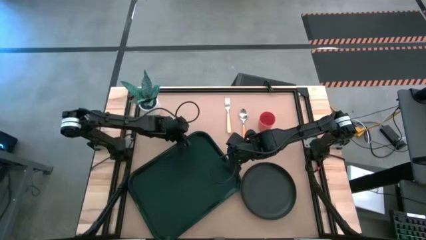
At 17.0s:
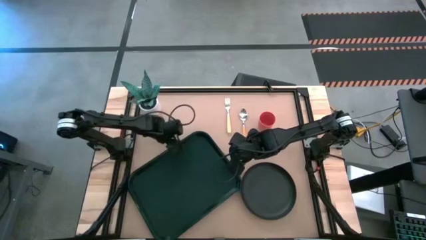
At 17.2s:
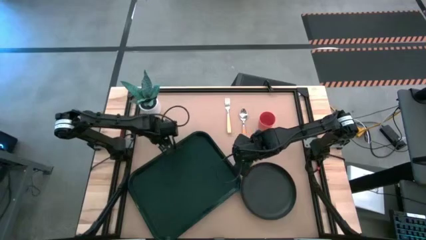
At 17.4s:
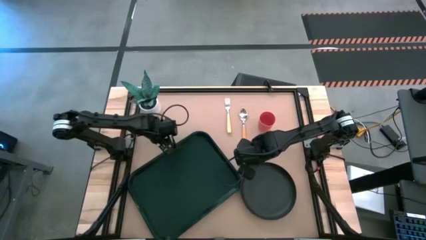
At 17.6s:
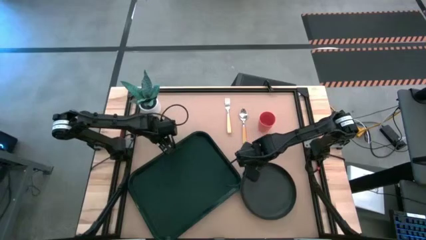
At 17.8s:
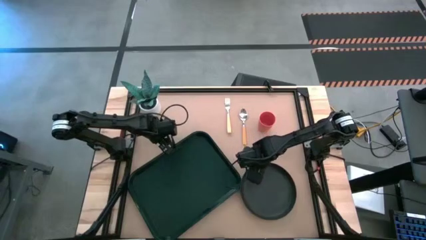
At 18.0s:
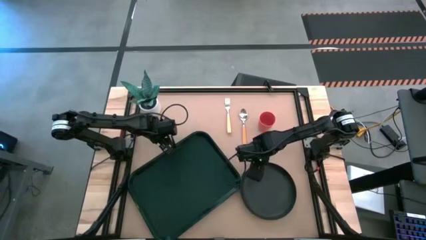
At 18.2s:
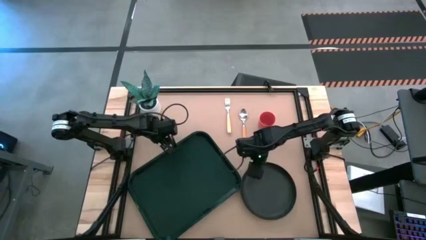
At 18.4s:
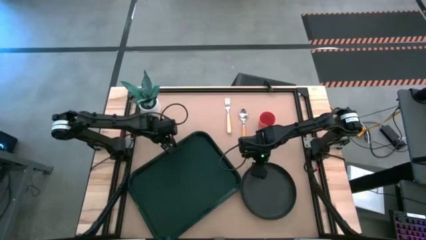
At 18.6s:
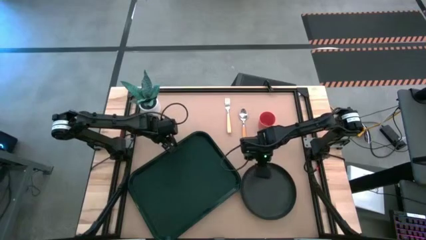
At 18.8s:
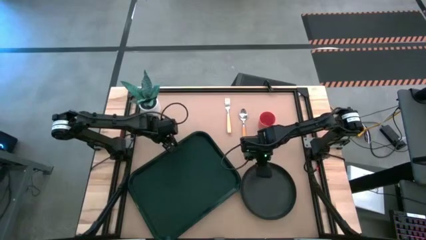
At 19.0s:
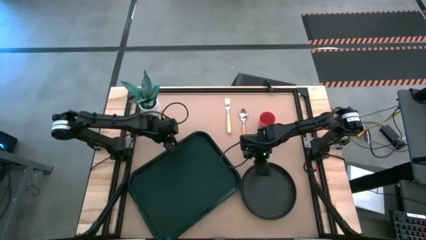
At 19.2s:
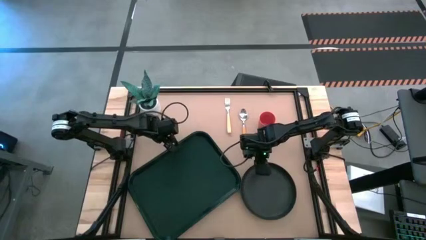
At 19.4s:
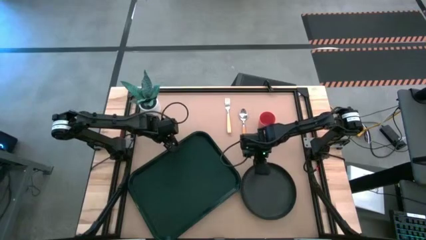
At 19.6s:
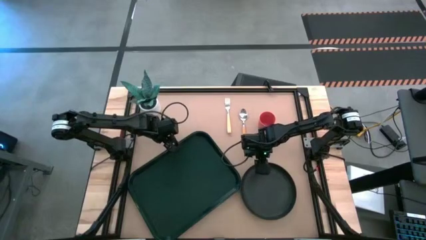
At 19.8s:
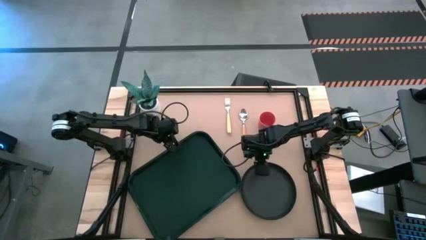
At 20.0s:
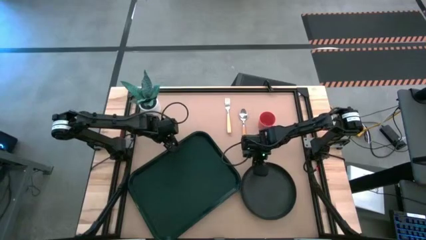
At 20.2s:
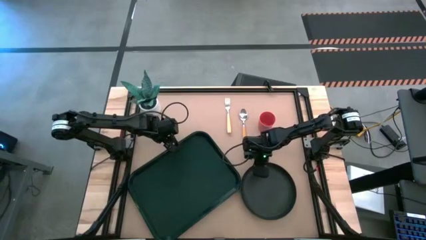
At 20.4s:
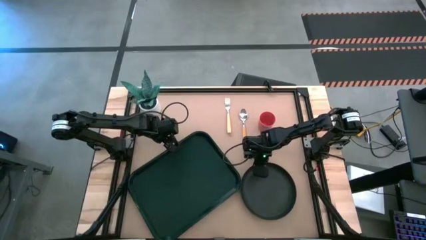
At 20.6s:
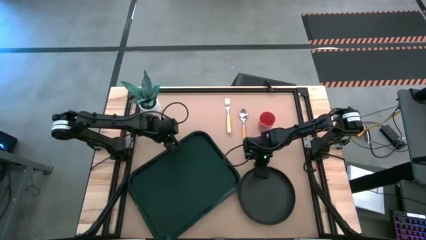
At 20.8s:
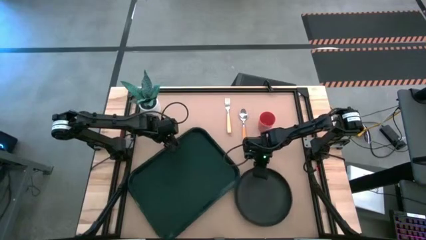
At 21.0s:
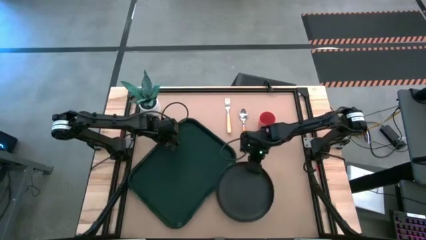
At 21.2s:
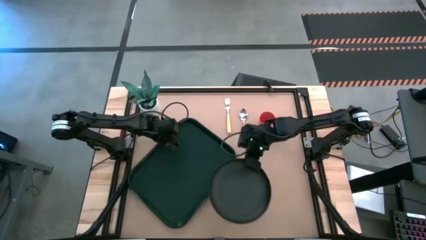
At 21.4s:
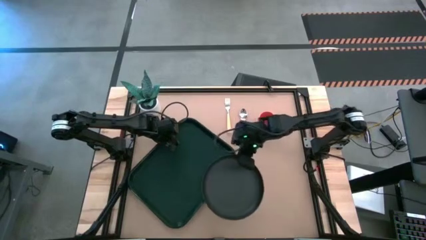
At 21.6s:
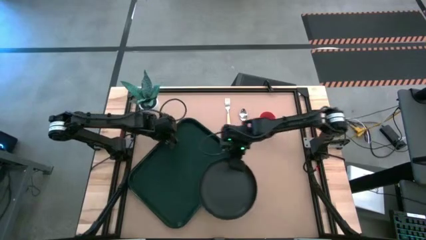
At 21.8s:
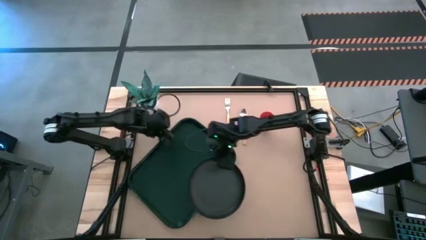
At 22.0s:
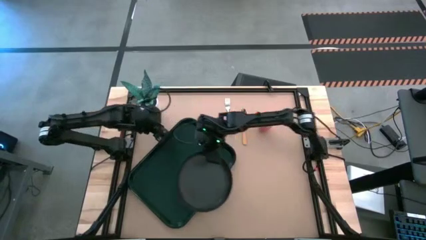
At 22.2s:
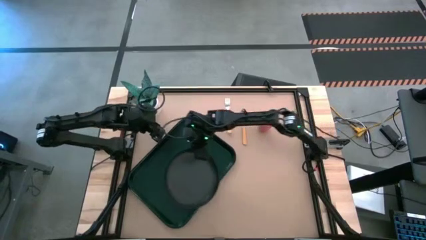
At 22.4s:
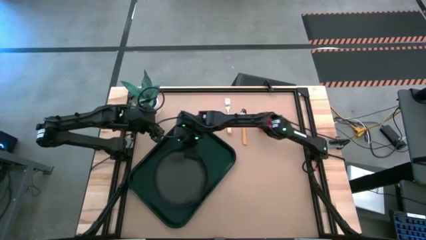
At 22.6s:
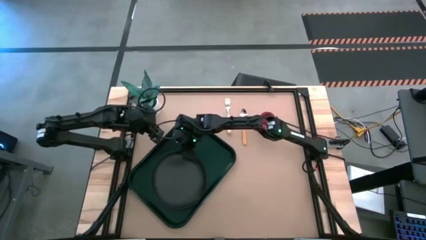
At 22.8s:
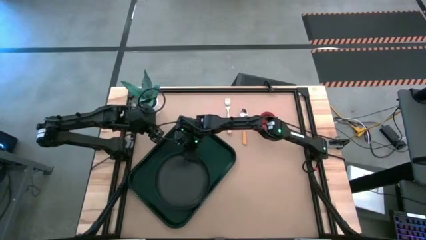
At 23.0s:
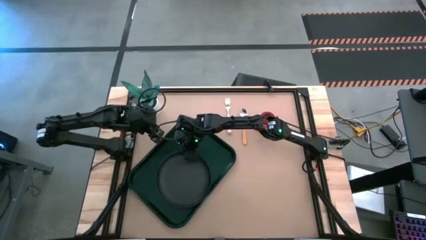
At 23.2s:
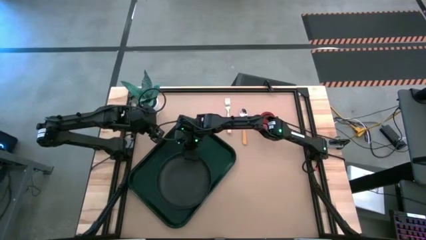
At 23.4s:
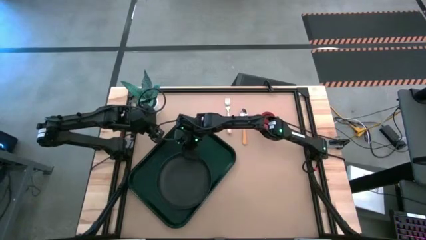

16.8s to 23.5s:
Task: Pick and place plate/cup/fork/spoon on tray
Put the black plate on the center of the black serving tray

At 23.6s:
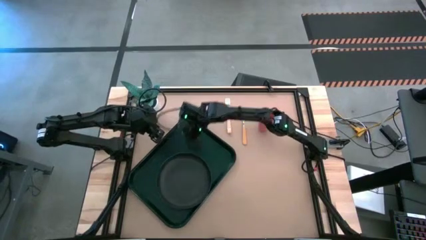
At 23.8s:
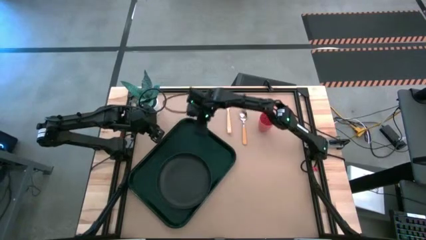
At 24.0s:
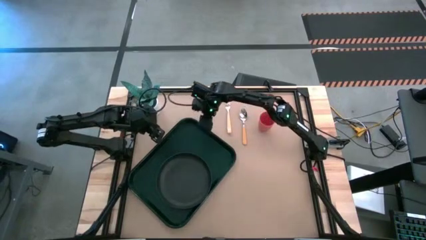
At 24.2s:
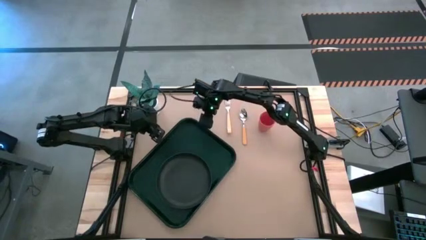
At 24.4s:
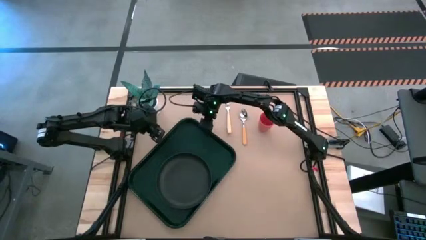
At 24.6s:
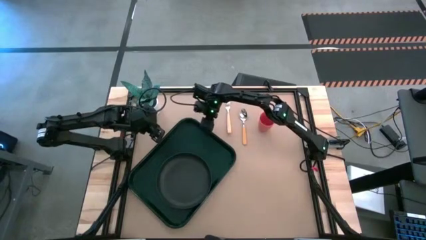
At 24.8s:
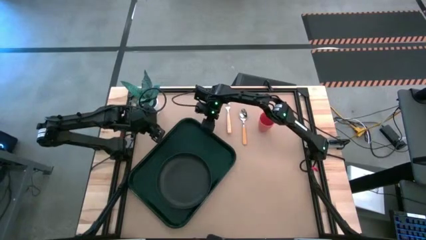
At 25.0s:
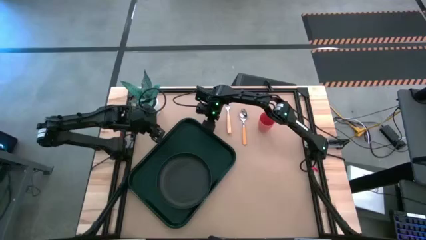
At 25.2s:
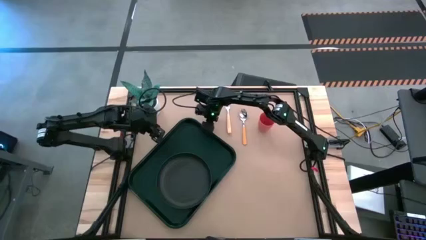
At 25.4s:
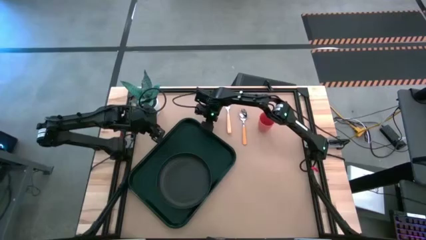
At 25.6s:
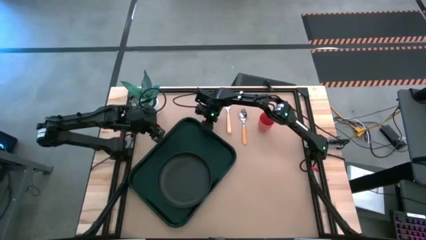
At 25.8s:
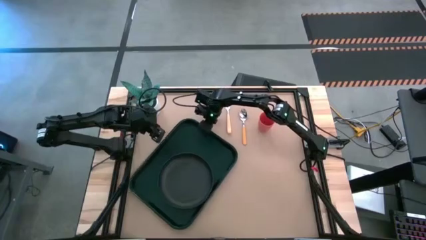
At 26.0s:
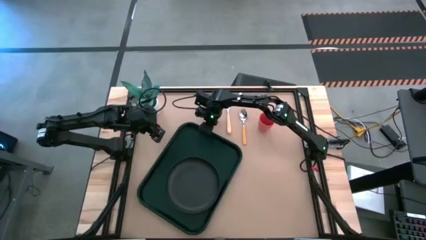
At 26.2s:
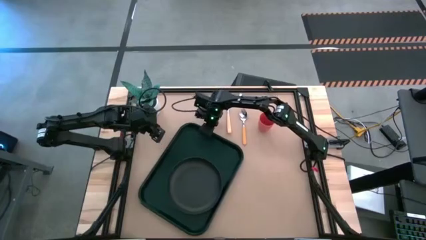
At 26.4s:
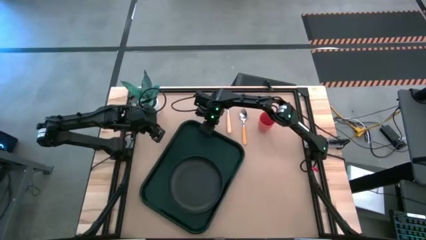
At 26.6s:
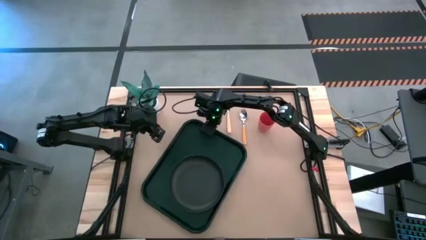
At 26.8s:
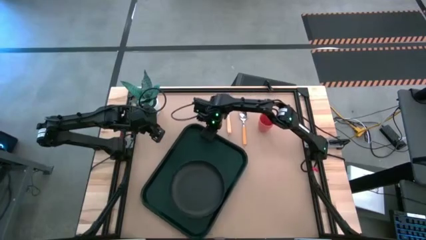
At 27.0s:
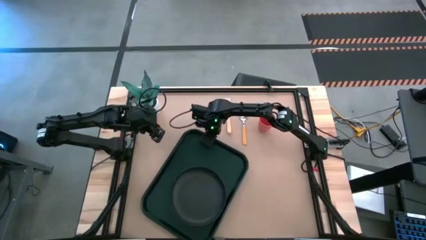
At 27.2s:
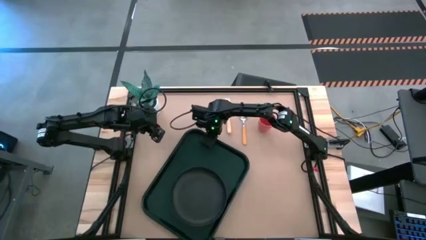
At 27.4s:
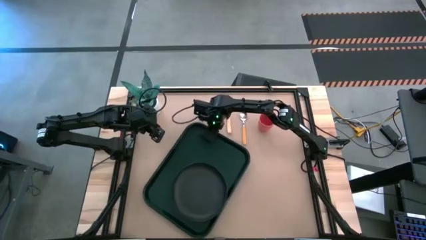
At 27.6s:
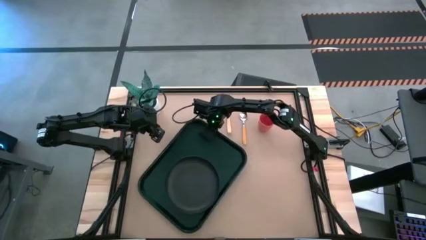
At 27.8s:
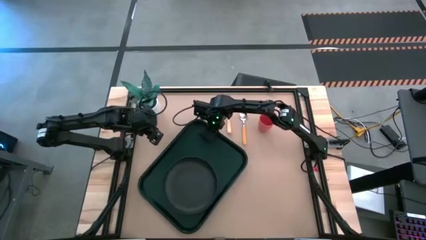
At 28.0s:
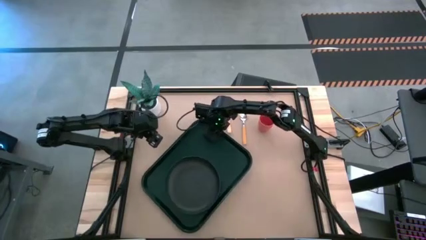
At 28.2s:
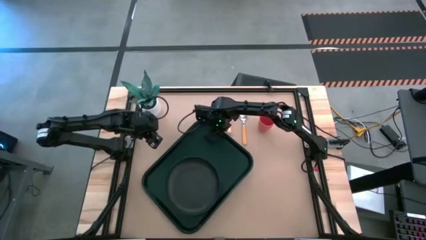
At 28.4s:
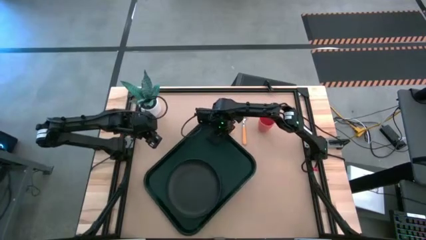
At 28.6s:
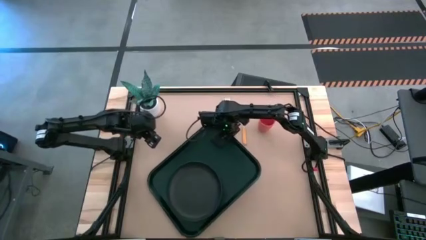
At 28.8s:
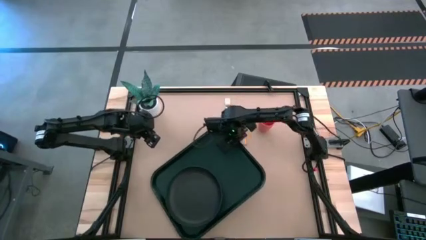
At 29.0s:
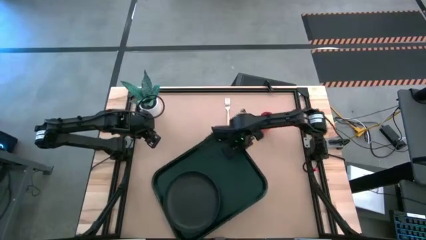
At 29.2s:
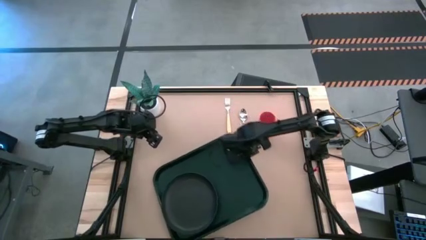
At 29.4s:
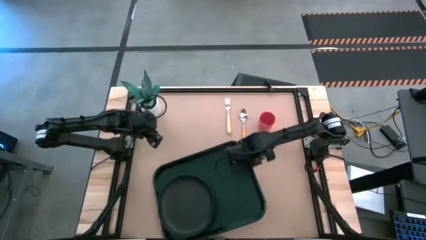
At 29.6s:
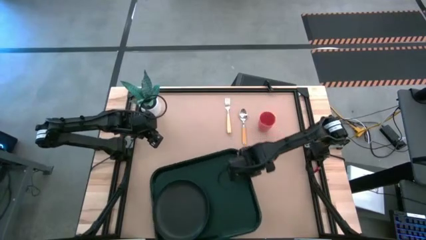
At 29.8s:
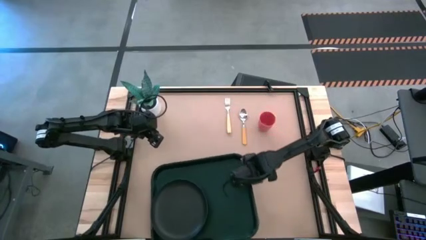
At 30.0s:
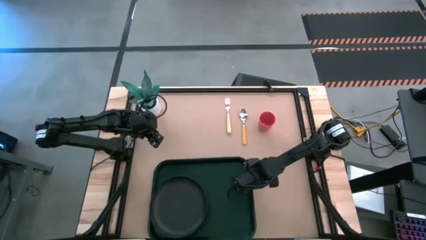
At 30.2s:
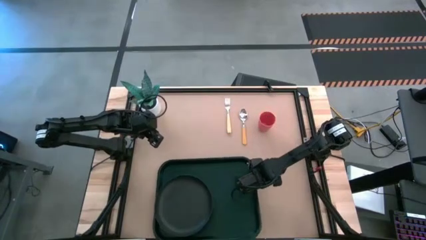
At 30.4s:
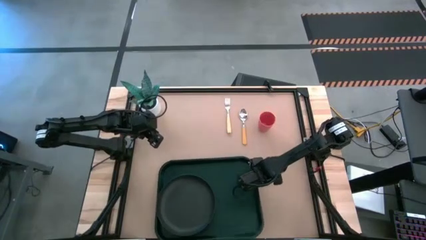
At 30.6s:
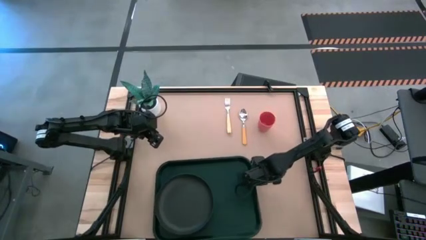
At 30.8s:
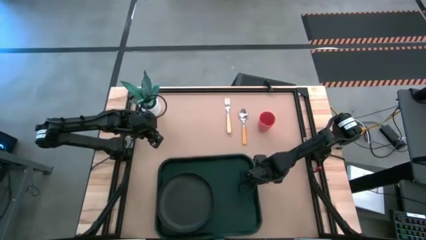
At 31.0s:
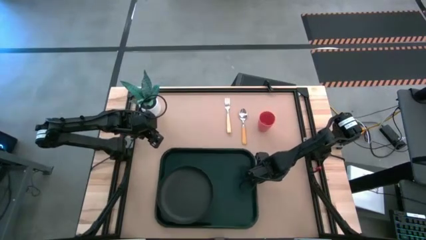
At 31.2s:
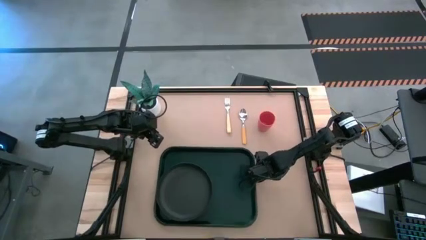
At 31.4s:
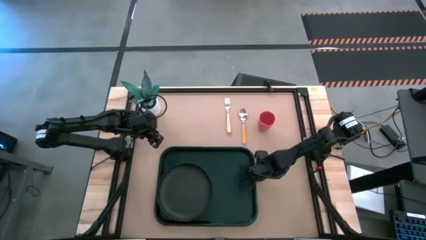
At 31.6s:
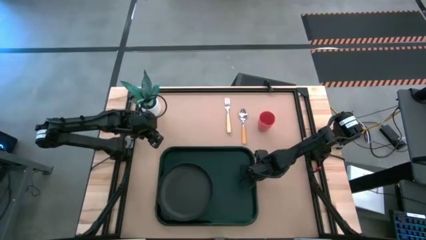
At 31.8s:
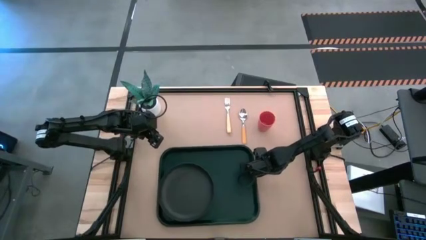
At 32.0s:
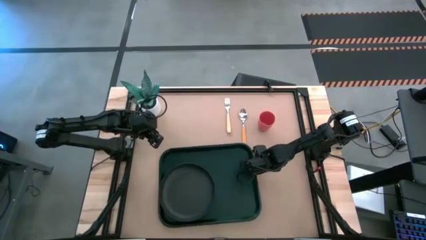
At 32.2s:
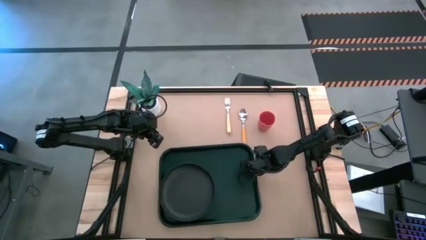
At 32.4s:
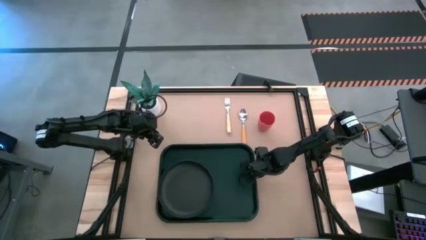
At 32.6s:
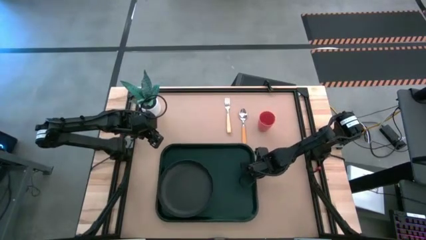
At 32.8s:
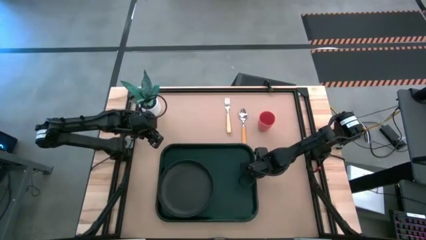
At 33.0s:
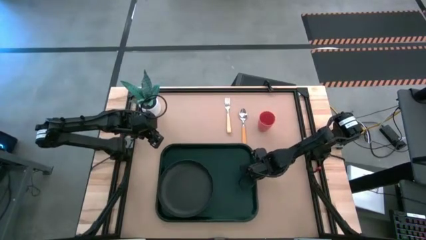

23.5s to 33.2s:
Adjust the black serving tray
